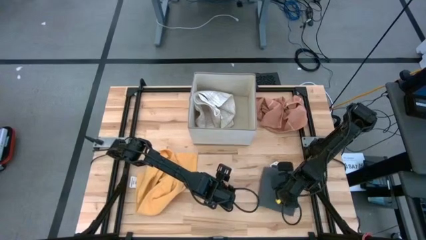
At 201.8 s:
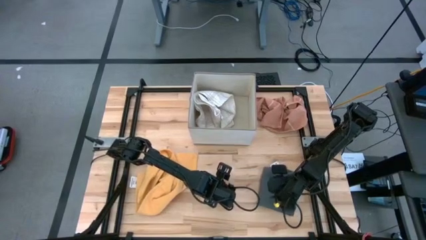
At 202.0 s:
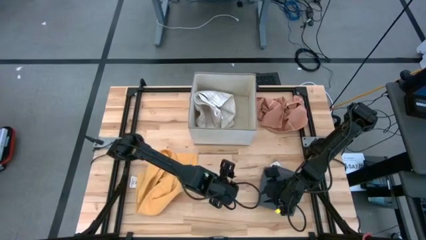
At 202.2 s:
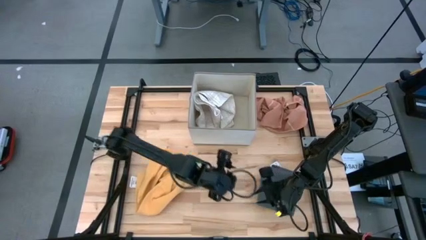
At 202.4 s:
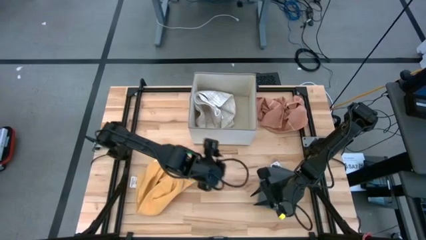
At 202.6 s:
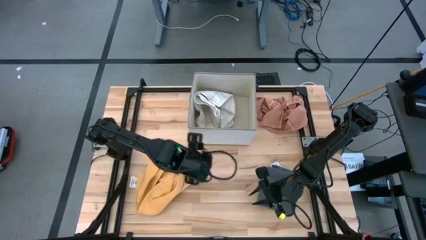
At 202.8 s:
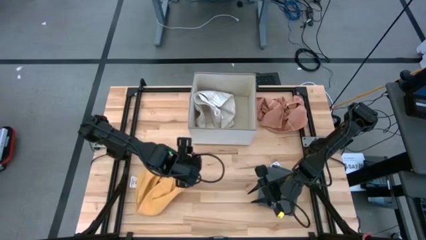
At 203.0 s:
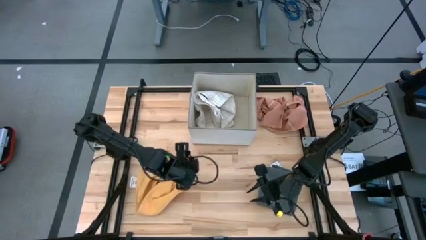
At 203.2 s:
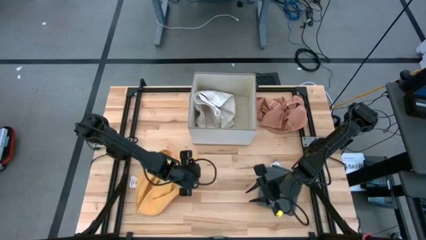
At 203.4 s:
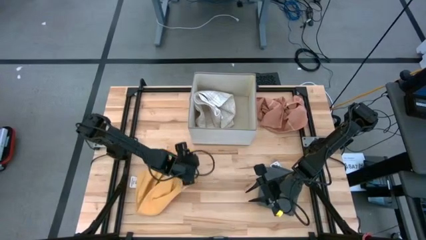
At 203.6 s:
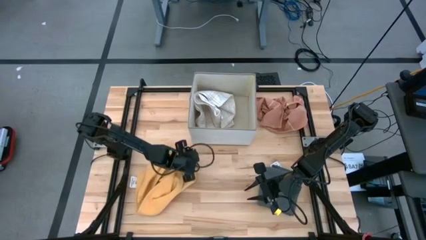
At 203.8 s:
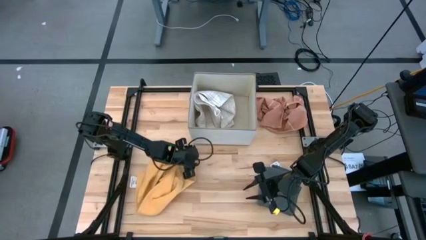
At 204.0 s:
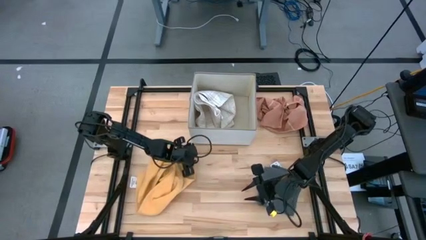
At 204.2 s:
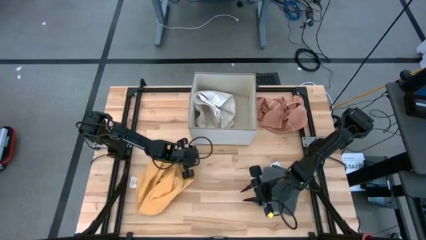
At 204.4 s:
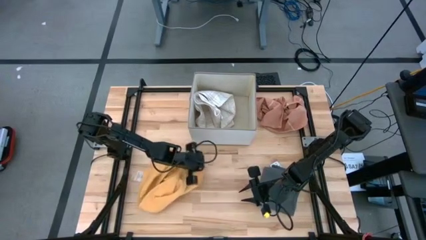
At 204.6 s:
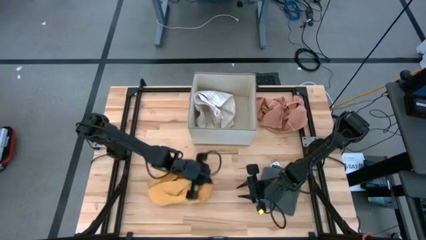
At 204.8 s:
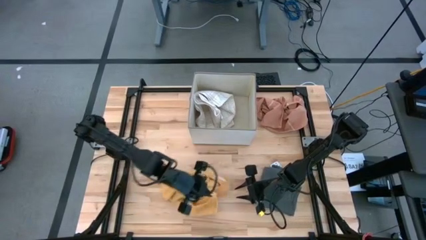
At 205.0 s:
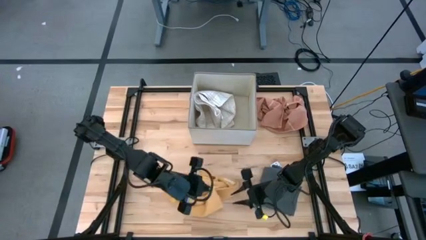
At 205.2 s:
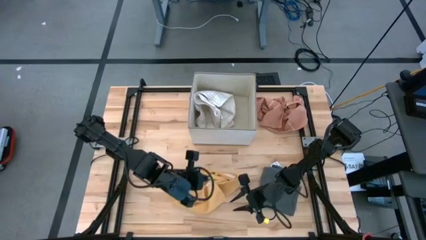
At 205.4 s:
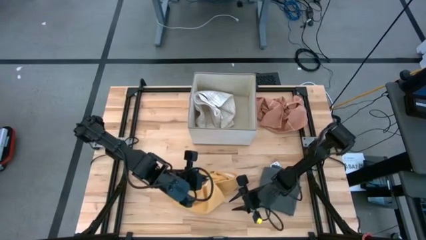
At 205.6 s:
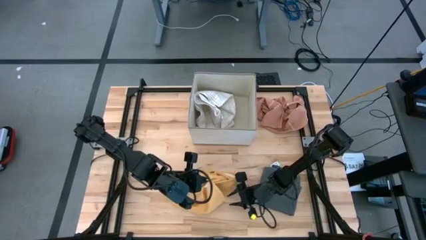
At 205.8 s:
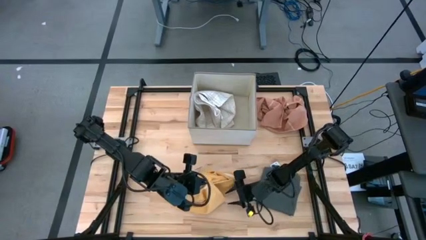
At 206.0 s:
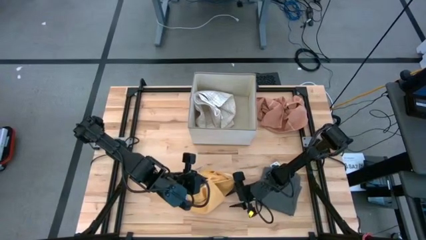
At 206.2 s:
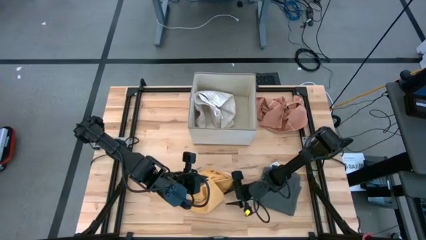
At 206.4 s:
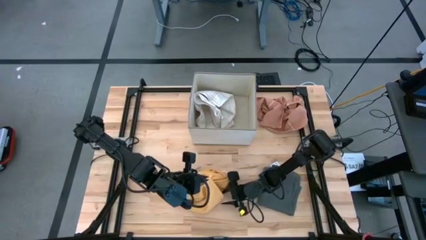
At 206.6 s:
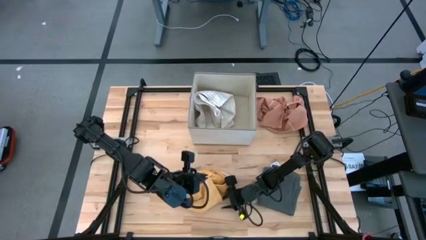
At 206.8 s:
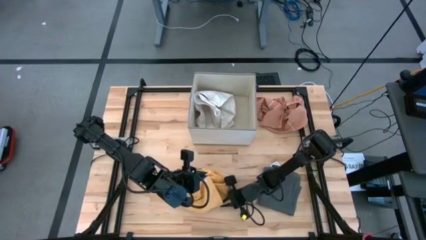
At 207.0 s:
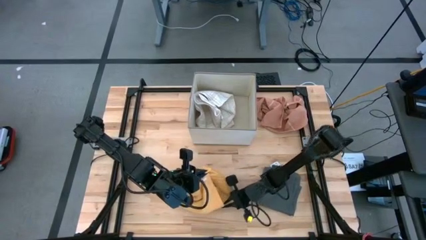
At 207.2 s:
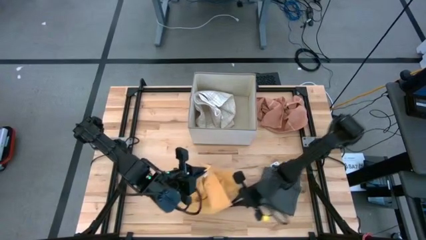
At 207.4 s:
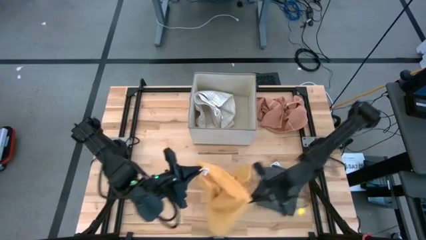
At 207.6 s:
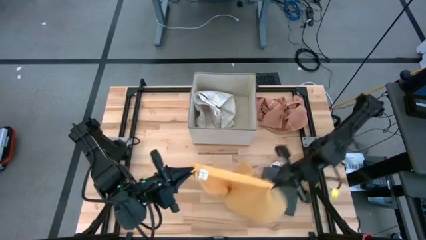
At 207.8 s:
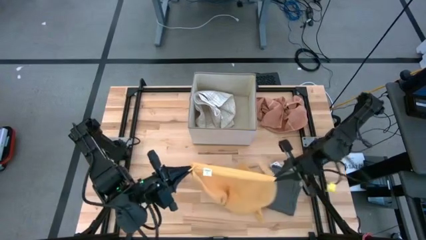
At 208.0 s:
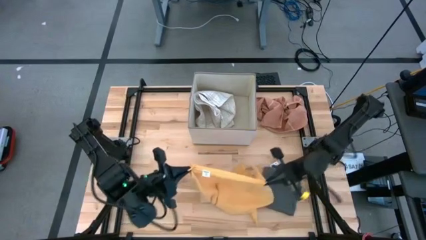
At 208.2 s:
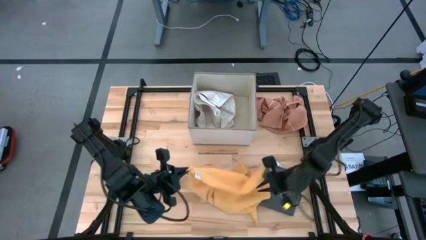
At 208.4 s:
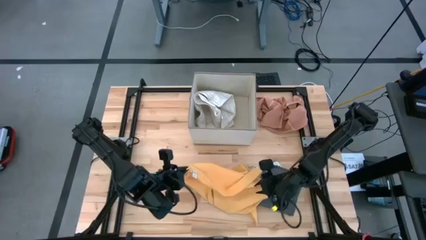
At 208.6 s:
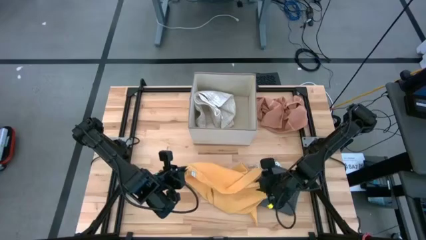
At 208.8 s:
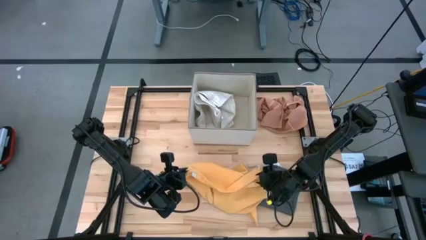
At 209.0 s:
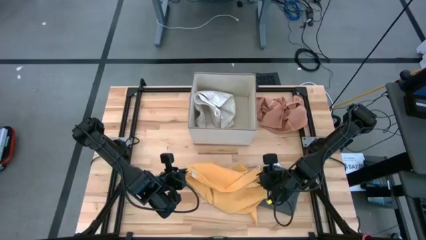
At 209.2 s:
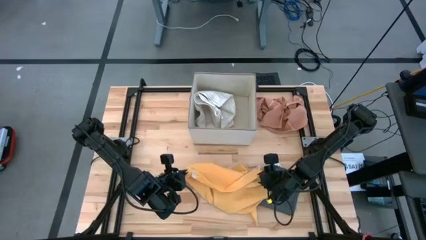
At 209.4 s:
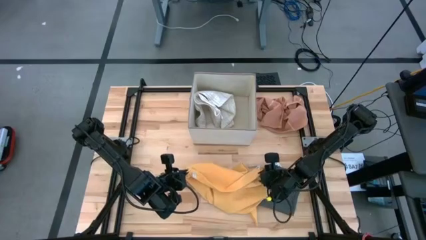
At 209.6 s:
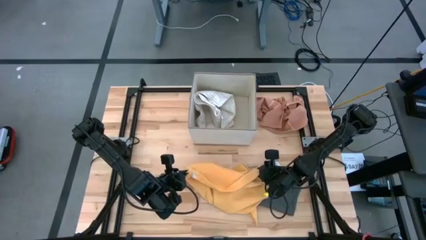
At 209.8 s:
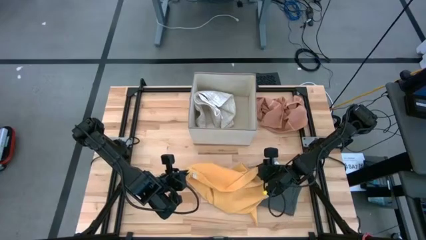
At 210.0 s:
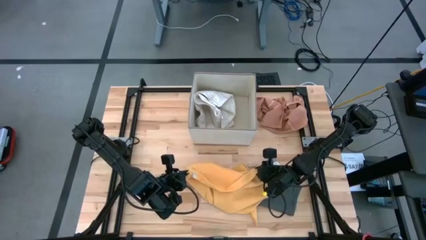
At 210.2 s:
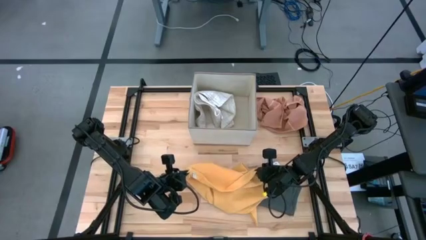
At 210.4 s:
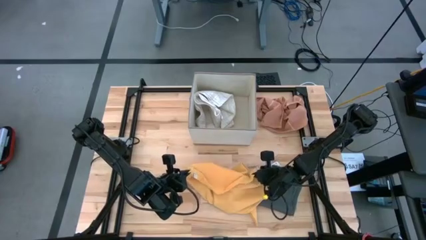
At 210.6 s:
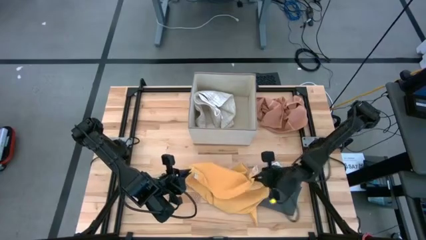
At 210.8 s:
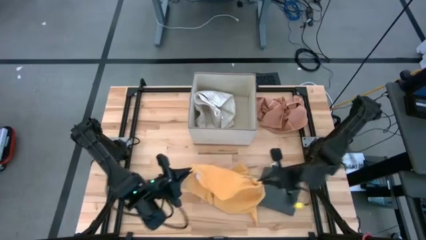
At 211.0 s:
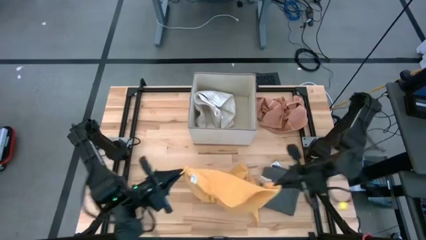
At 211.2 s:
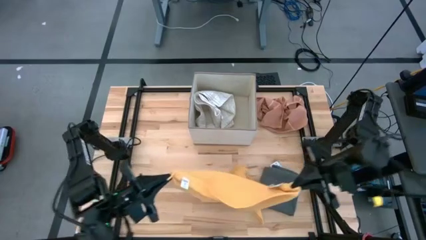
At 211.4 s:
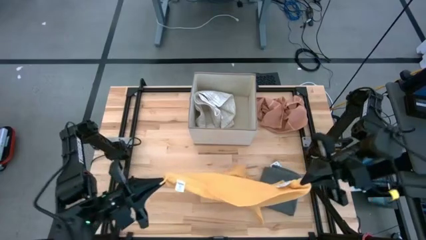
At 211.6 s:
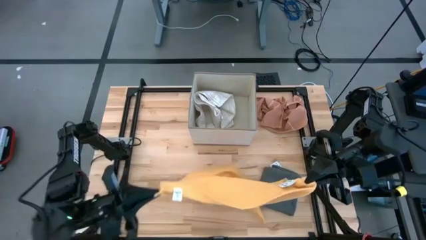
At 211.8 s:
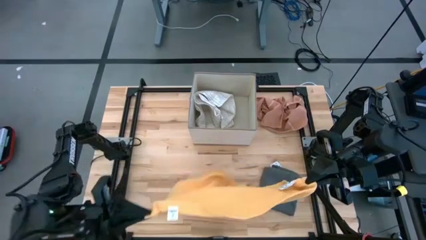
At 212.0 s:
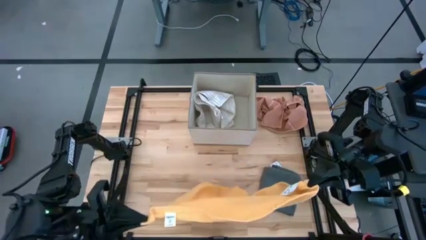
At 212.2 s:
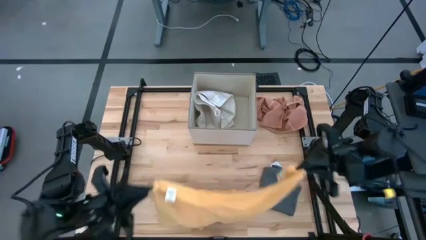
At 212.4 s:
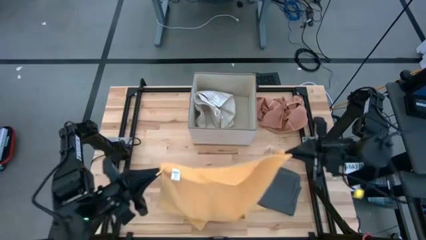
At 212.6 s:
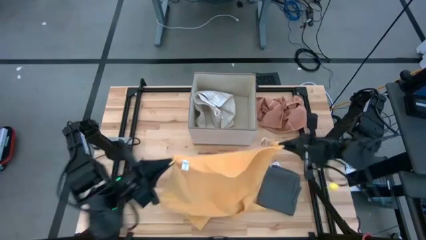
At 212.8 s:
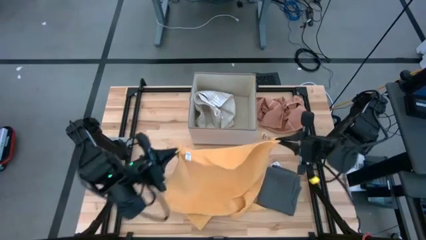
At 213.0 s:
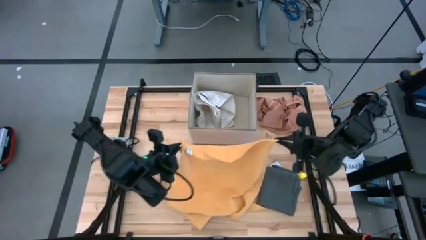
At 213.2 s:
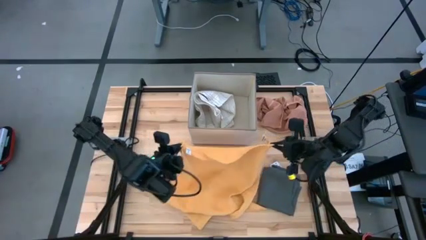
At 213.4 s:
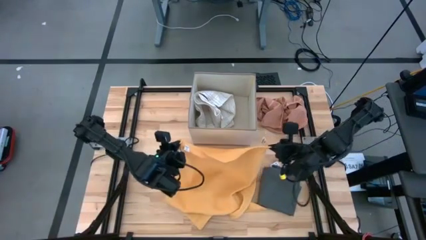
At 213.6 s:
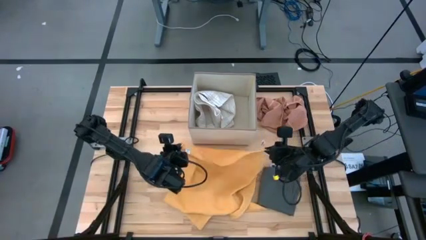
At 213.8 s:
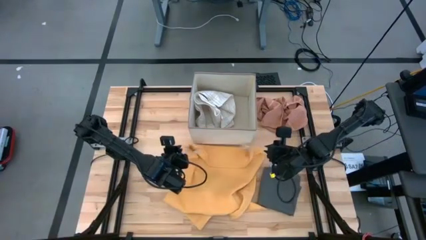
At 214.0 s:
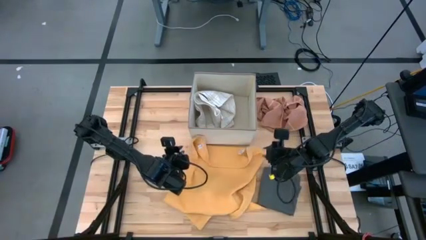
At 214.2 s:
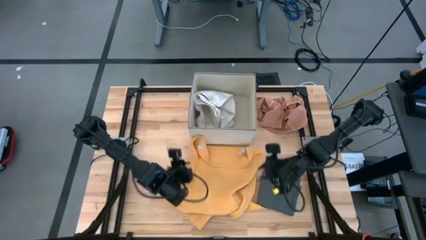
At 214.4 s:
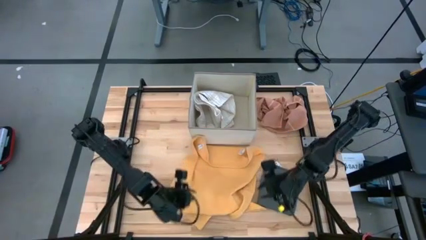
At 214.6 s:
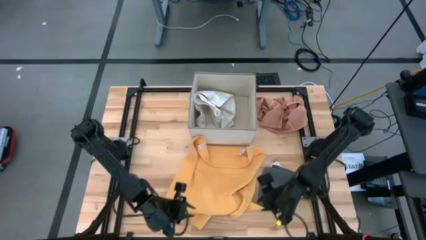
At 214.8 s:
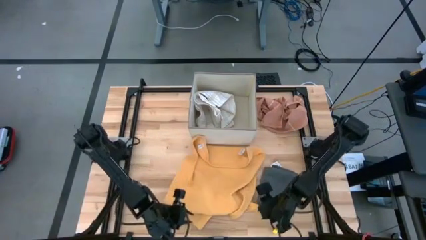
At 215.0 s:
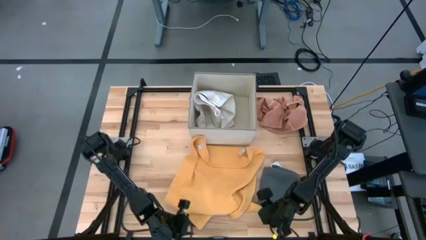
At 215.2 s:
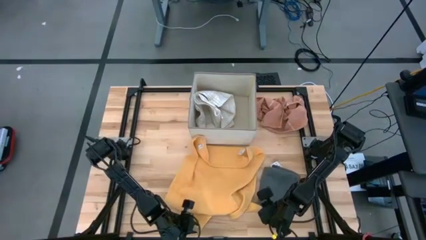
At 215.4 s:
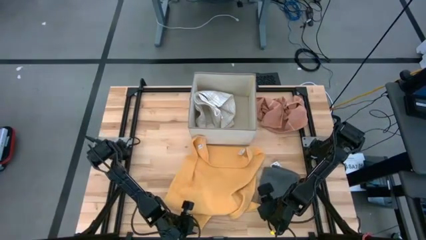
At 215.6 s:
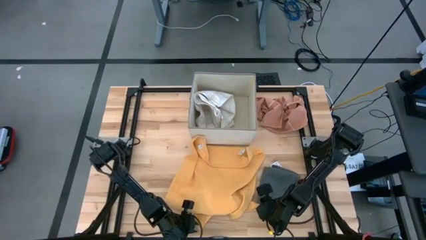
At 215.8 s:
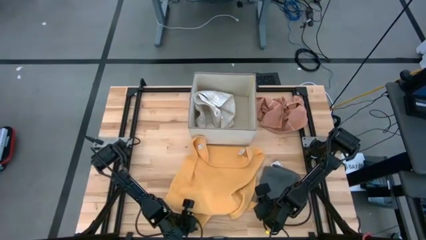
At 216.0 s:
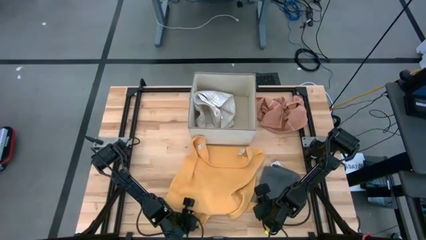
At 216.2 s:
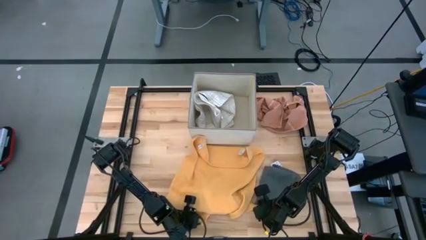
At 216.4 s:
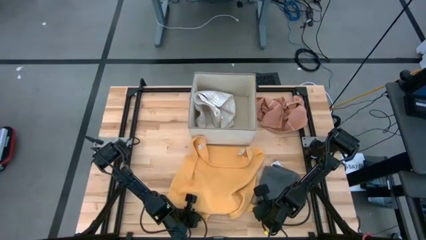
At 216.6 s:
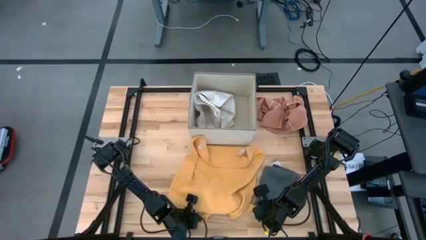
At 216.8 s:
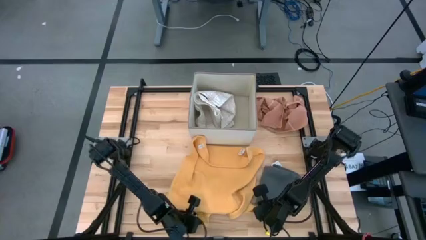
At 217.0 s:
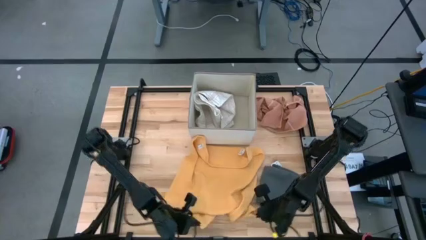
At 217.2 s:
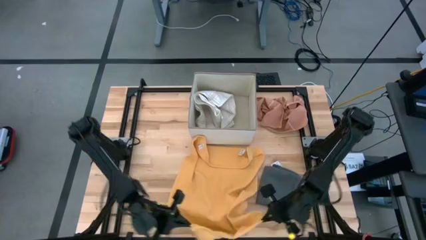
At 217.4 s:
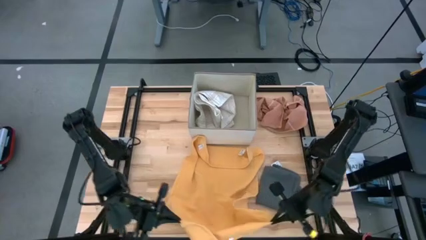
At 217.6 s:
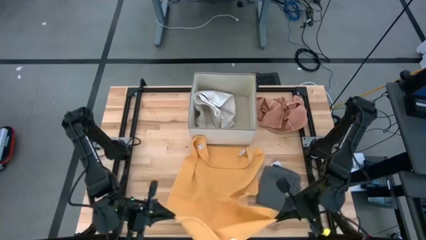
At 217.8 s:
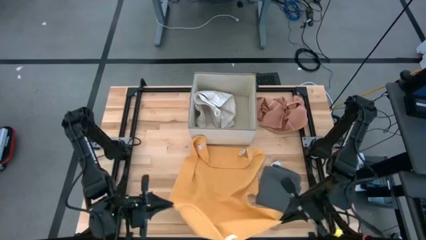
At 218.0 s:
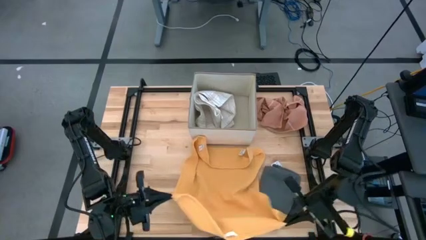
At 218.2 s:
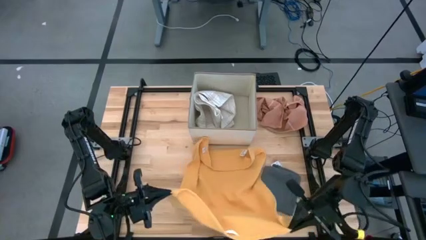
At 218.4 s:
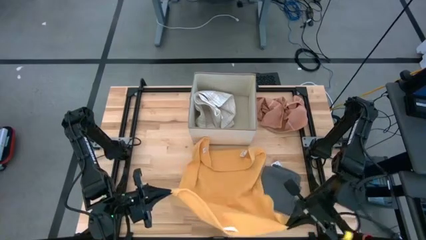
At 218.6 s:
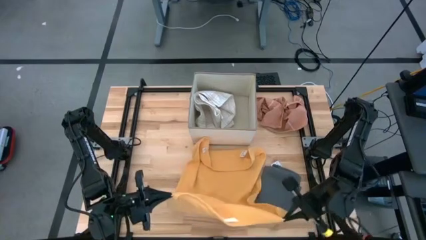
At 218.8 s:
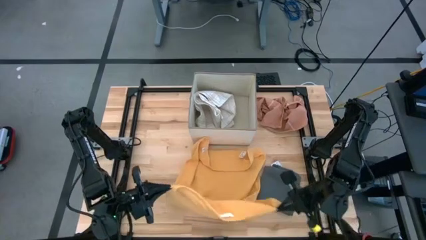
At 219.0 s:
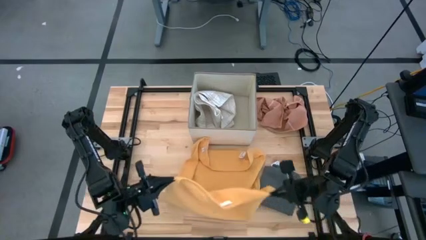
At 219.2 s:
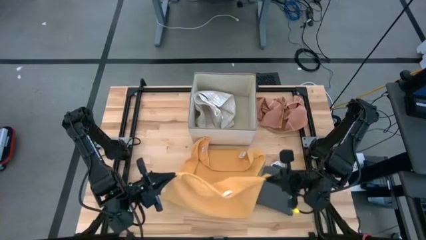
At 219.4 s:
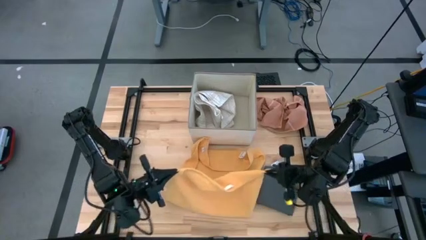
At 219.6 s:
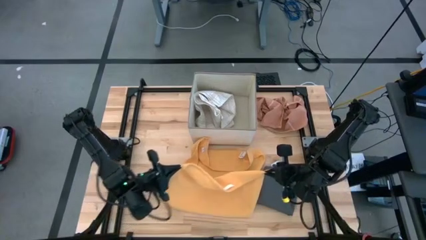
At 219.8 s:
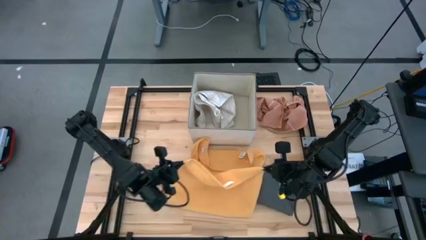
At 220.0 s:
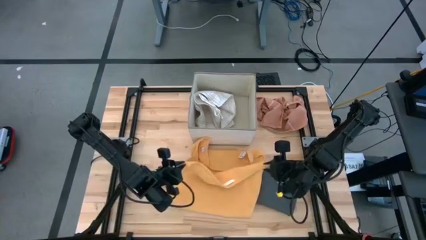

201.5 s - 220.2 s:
Task: Fold towel
Fold the yellow towel
